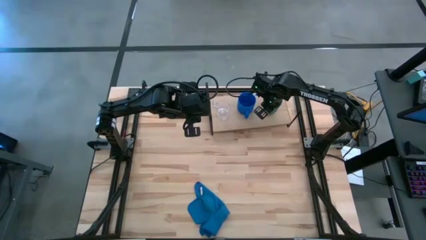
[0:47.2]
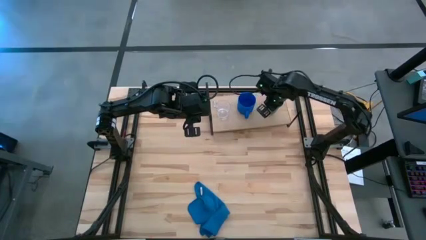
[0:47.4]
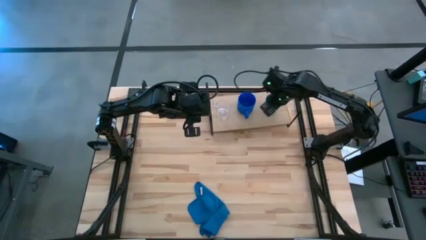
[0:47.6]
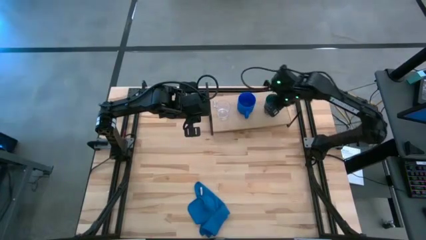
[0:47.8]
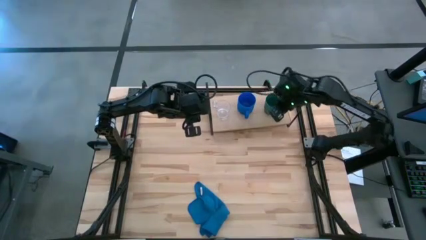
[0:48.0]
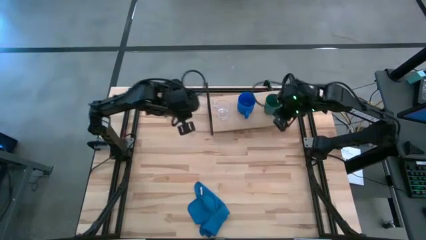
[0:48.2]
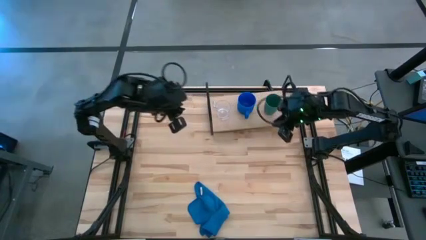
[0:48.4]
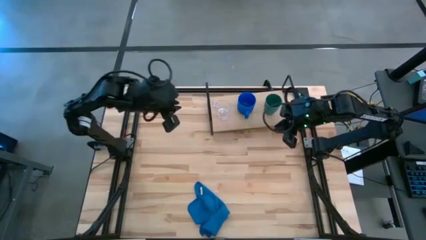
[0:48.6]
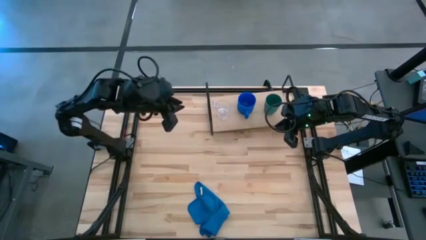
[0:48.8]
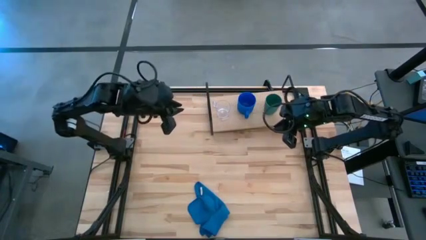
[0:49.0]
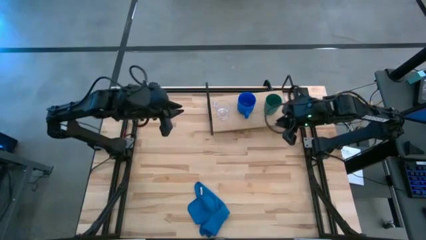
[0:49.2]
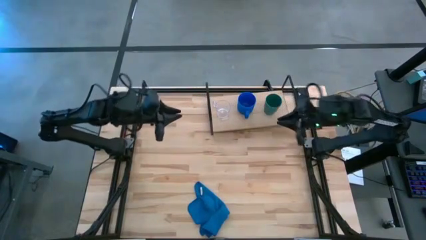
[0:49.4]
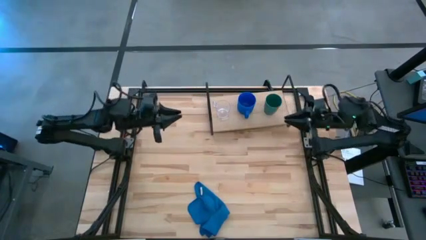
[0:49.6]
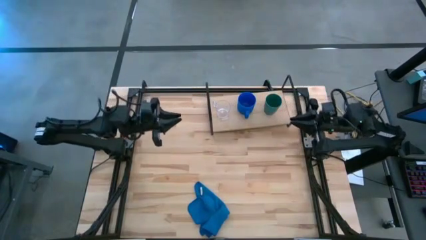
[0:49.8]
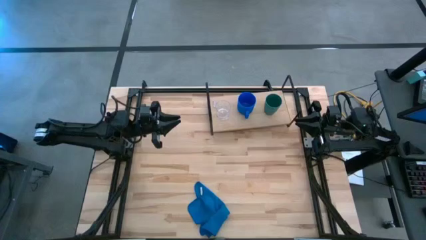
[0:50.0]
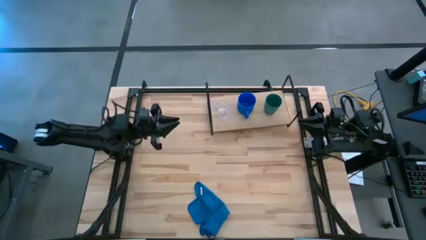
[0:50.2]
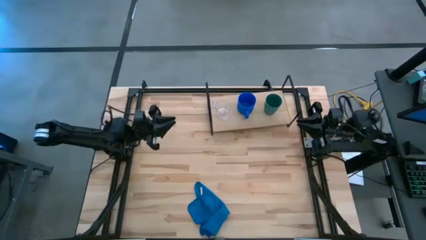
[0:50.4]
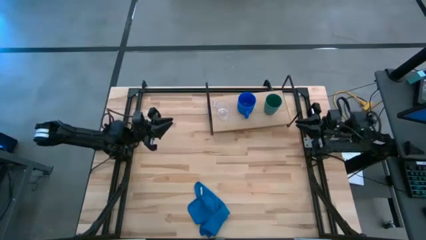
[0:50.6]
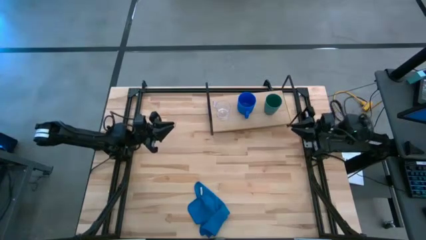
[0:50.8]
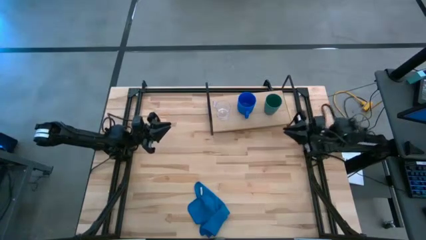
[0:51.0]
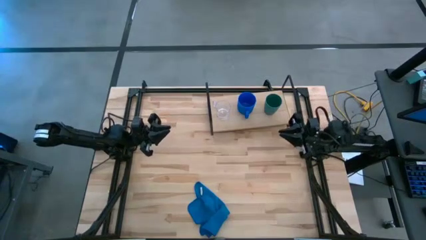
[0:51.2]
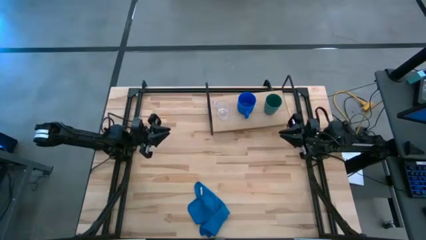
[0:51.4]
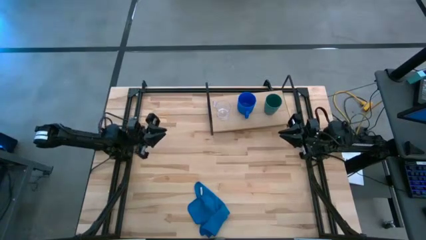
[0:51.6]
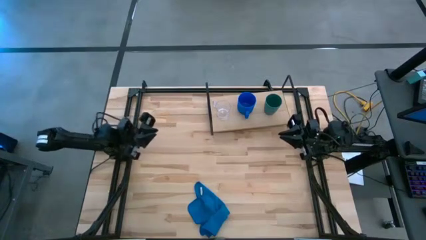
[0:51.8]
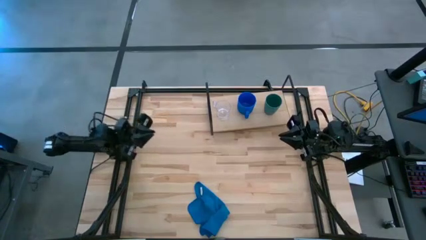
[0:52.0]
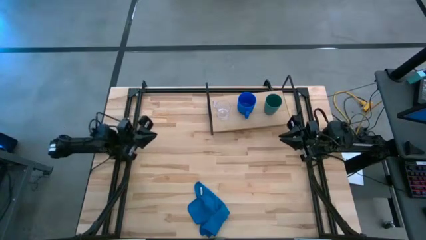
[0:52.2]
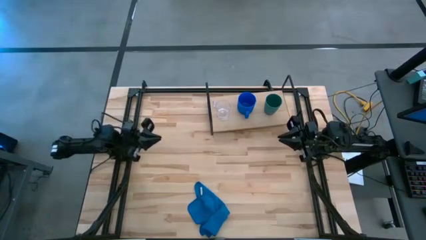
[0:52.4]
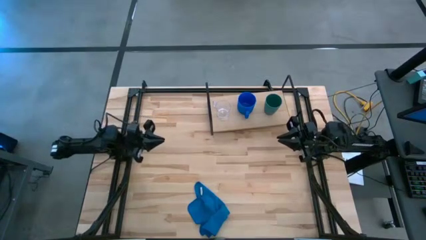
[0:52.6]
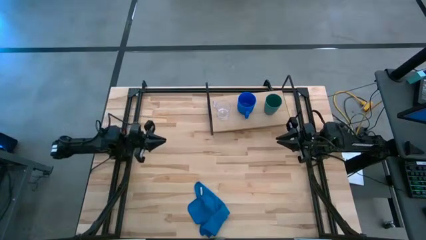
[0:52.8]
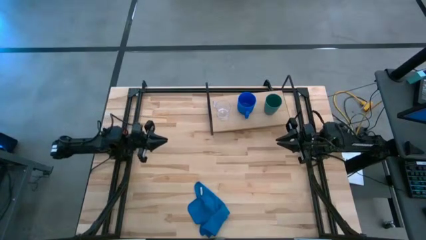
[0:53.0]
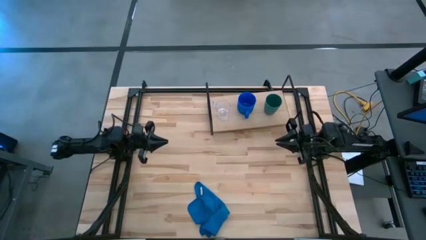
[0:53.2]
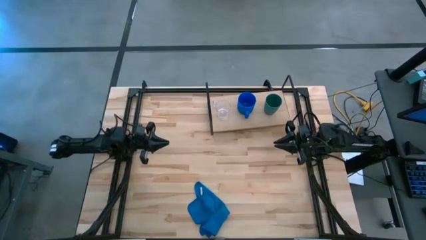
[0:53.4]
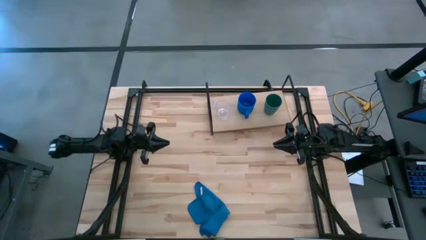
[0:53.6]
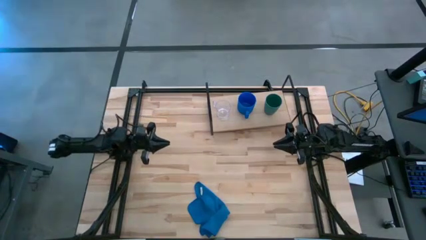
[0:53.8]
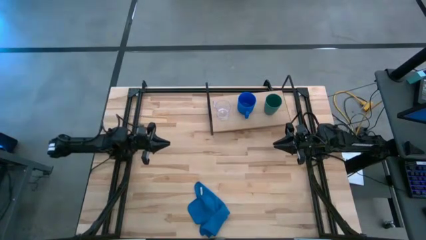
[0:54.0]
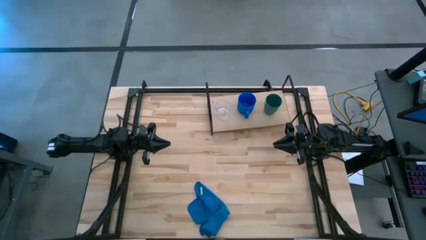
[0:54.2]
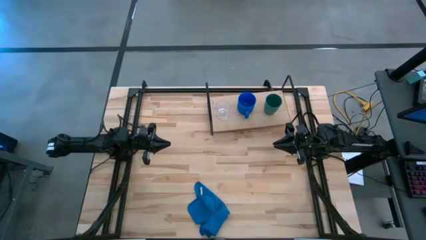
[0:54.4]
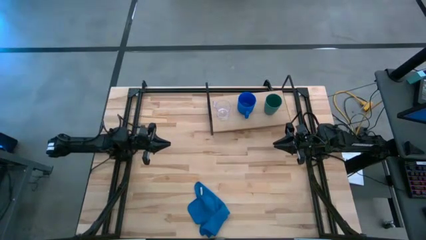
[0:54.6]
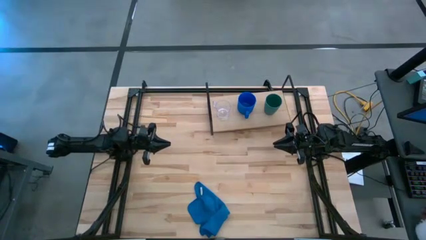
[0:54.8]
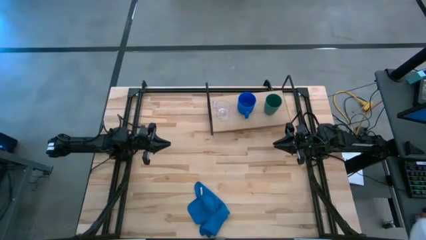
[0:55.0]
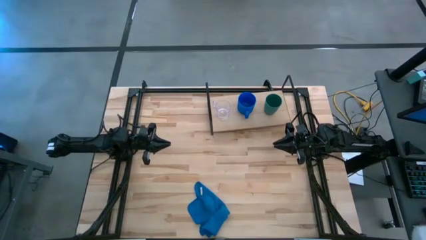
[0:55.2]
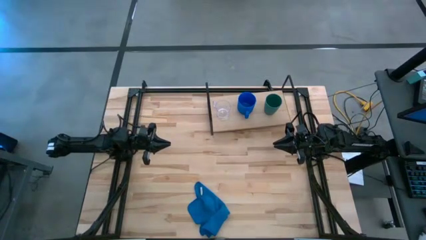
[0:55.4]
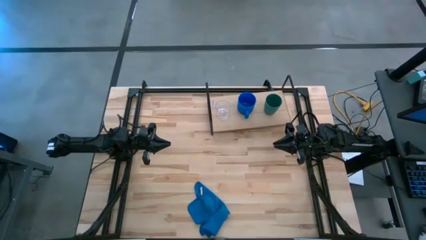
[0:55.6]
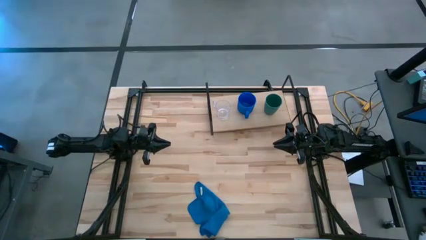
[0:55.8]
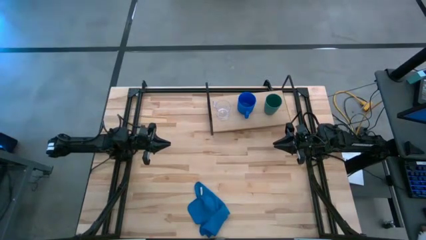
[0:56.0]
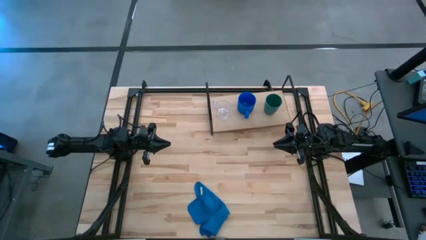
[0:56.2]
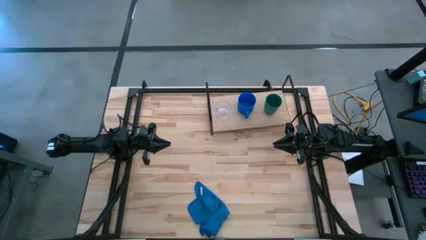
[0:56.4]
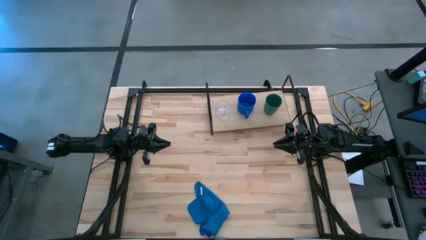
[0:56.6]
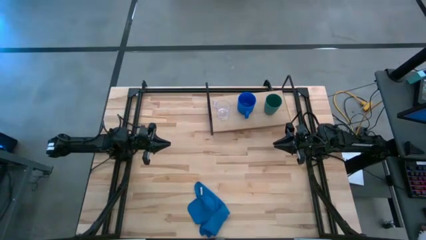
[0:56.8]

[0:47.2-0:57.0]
Task: Stack small to large cups/mugs on shelf
Return to Home Position

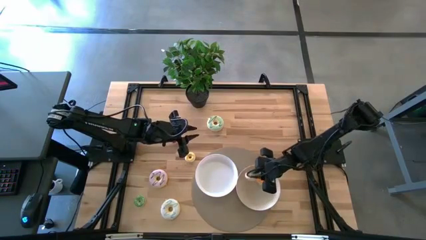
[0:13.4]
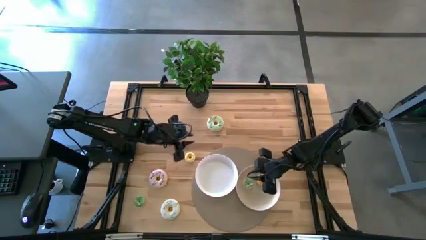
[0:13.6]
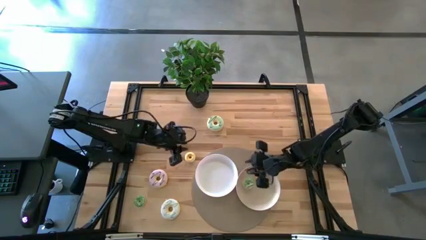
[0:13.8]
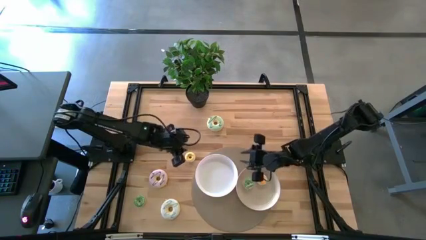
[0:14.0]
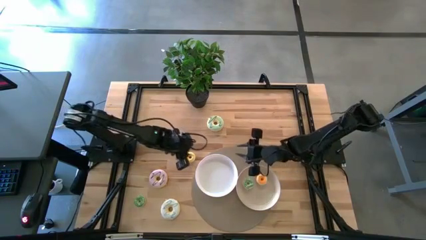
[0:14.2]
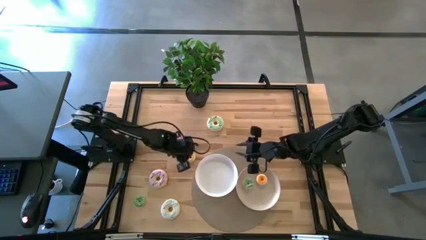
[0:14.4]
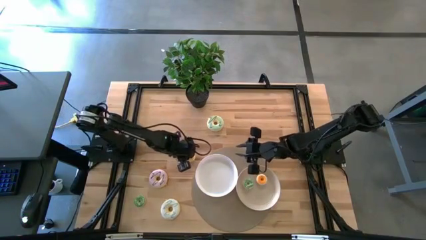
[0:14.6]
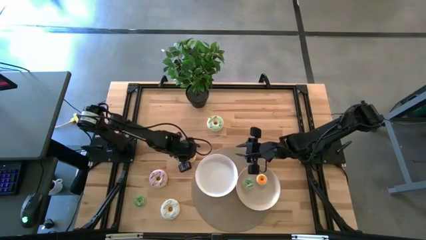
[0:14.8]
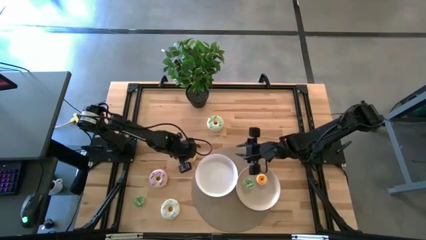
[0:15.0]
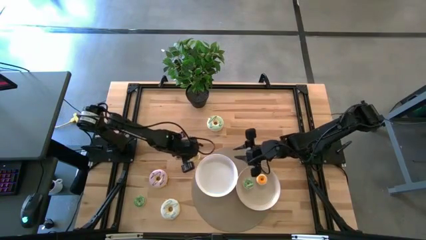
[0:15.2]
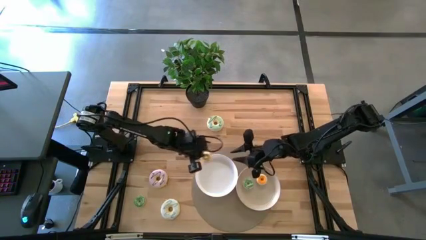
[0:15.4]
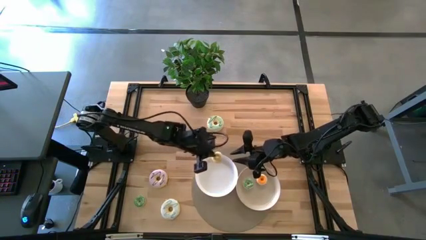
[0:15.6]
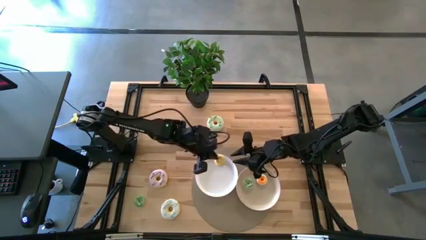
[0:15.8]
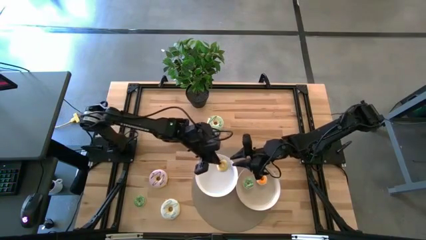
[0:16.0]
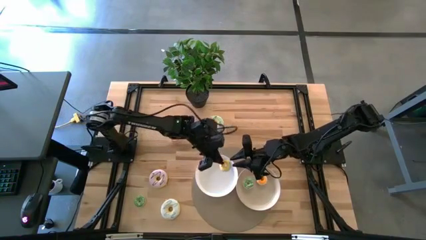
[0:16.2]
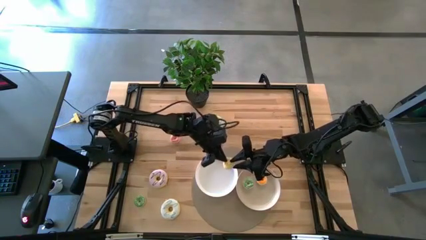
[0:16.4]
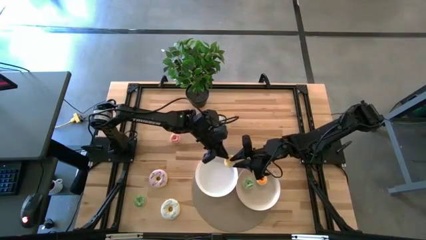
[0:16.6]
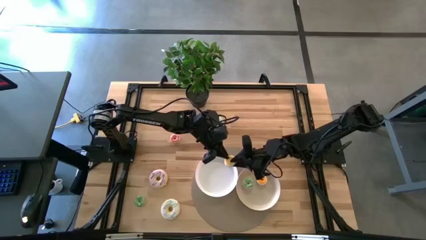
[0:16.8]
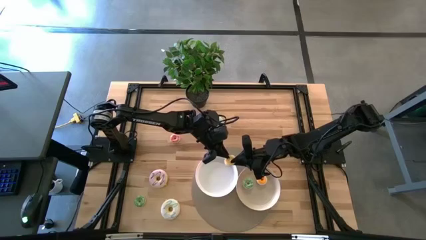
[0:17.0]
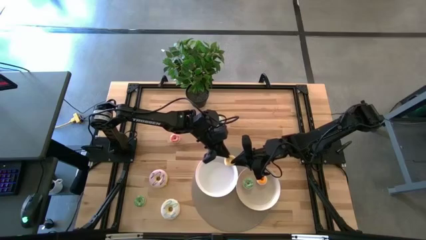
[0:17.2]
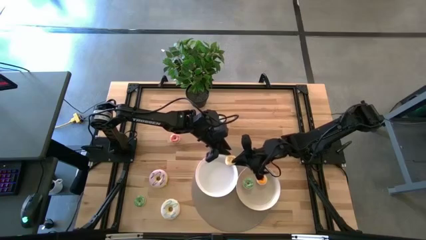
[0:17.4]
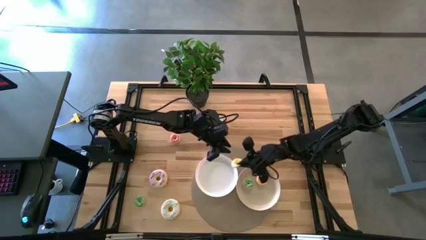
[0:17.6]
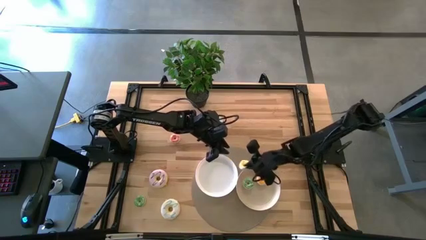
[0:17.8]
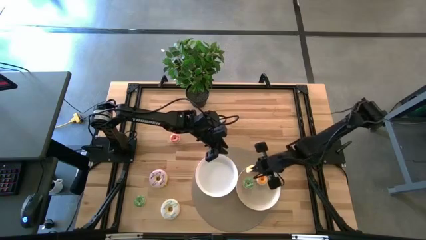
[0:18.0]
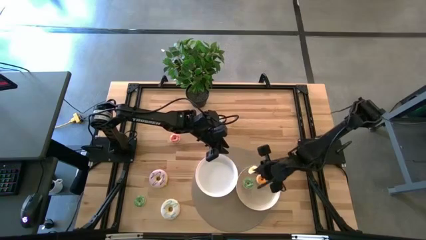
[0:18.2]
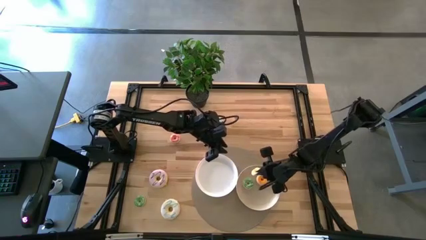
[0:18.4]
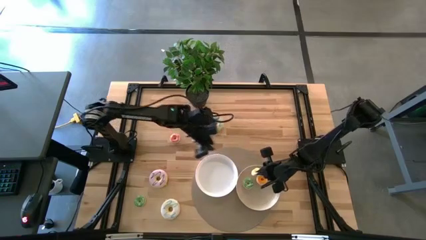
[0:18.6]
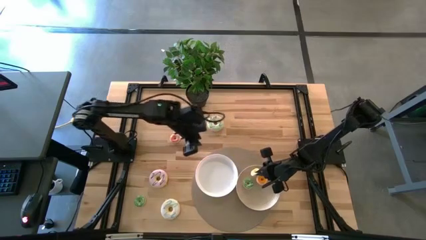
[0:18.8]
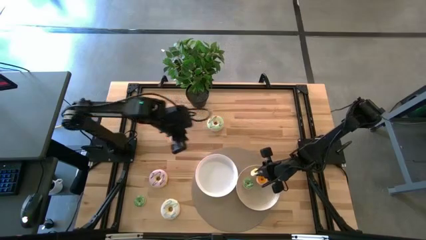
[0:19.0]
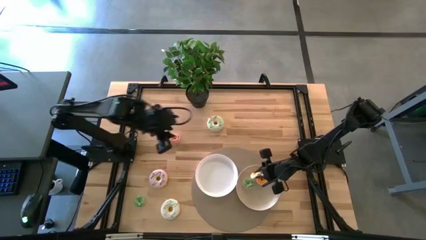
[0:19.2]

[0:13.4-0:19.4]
Task: Pick & Place donuts
Put the small yellow doughnut on the gray plate
